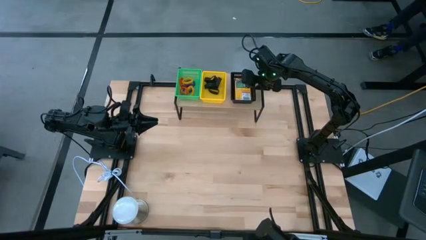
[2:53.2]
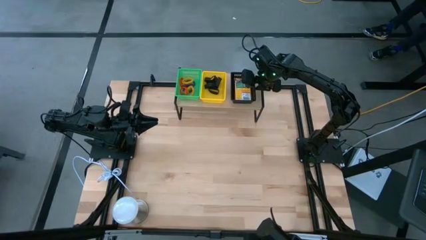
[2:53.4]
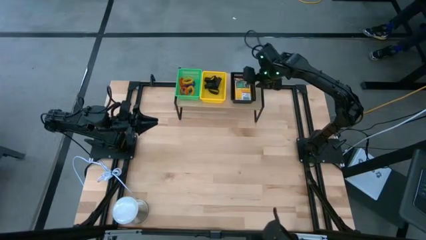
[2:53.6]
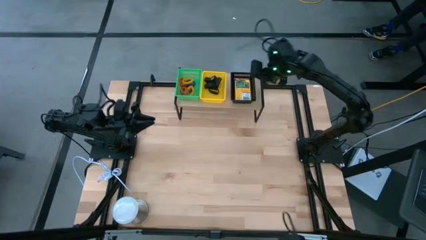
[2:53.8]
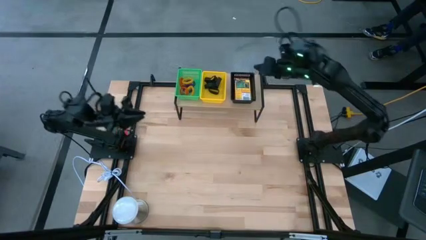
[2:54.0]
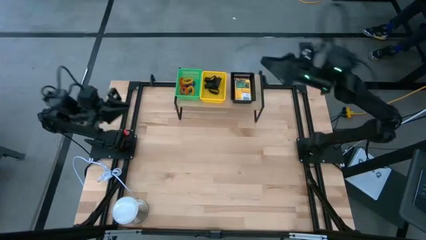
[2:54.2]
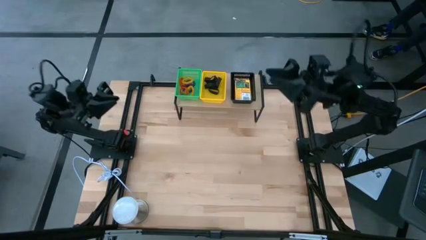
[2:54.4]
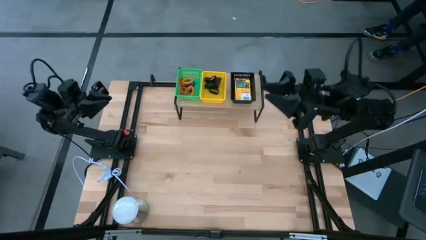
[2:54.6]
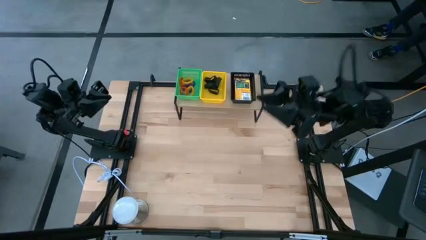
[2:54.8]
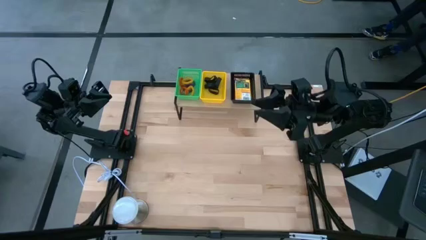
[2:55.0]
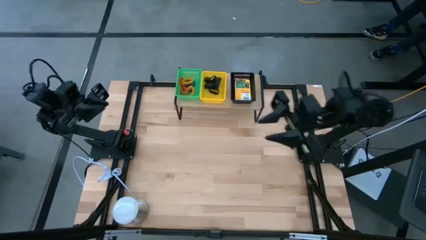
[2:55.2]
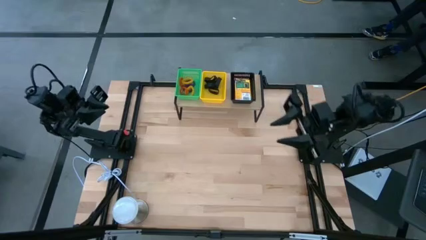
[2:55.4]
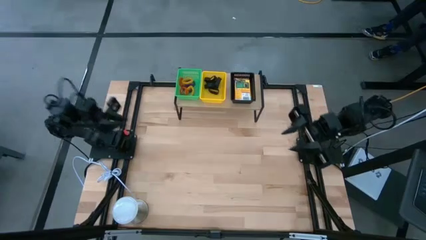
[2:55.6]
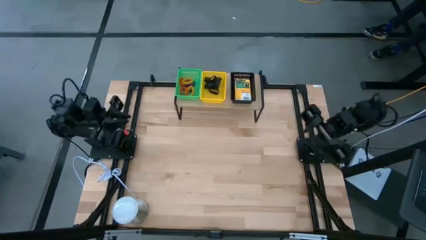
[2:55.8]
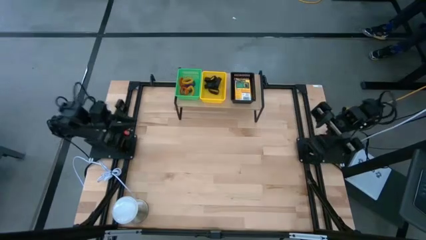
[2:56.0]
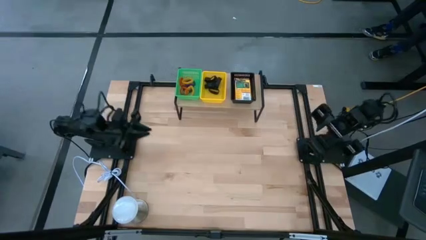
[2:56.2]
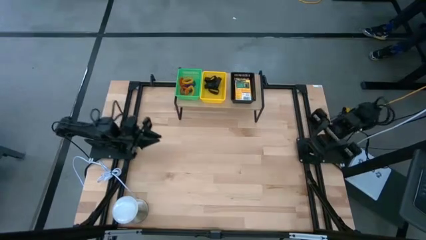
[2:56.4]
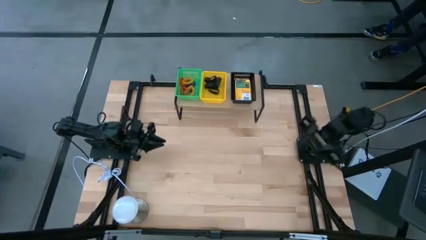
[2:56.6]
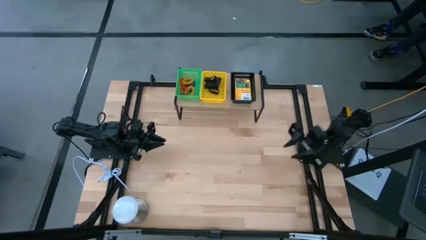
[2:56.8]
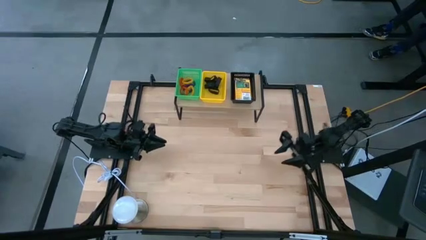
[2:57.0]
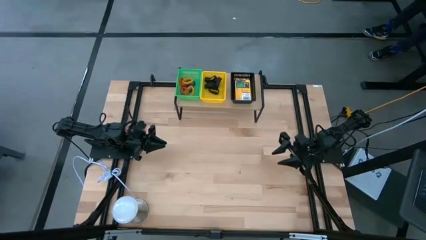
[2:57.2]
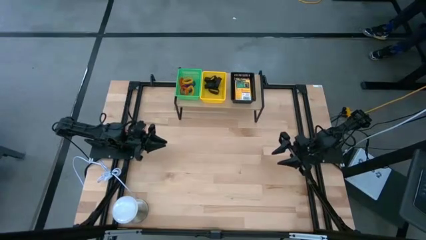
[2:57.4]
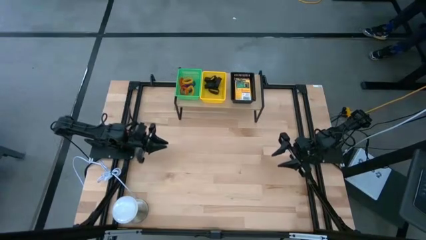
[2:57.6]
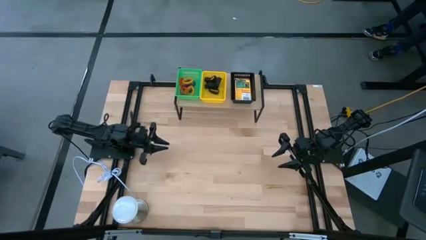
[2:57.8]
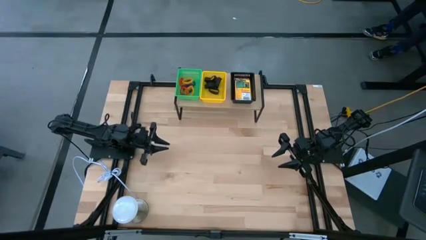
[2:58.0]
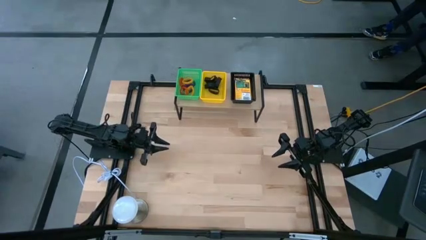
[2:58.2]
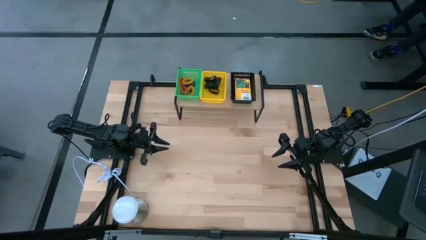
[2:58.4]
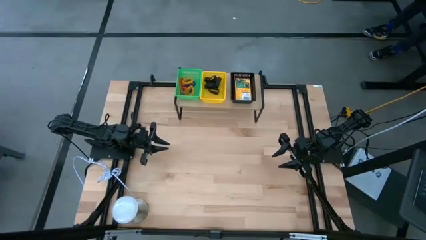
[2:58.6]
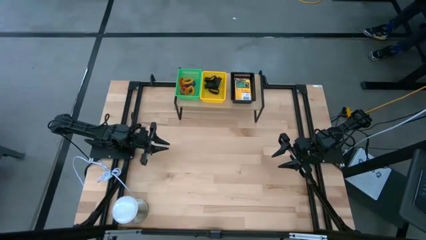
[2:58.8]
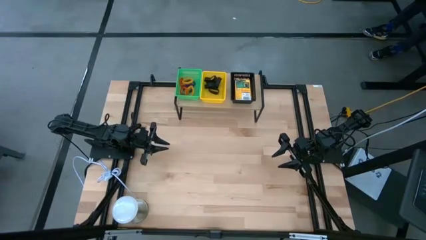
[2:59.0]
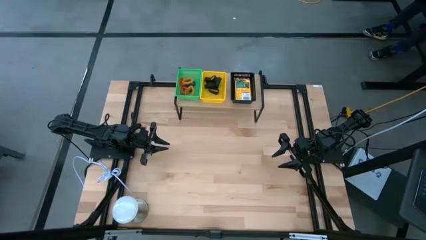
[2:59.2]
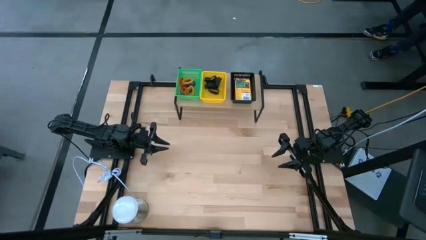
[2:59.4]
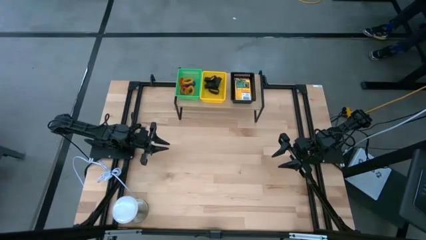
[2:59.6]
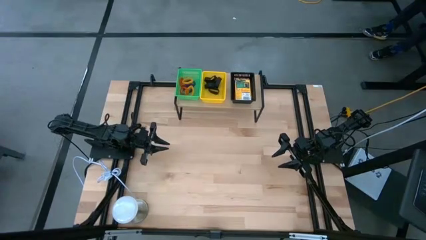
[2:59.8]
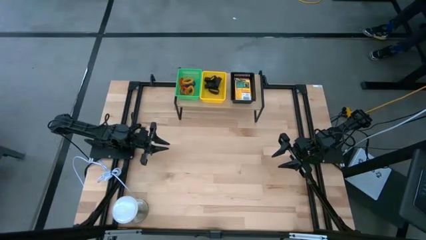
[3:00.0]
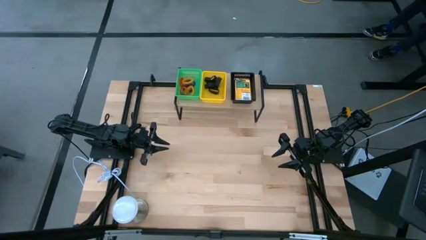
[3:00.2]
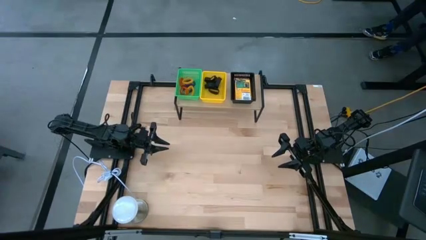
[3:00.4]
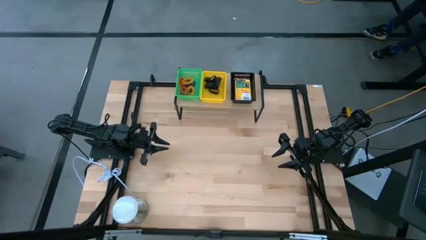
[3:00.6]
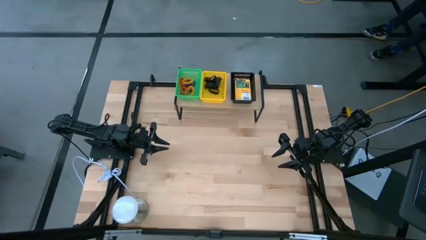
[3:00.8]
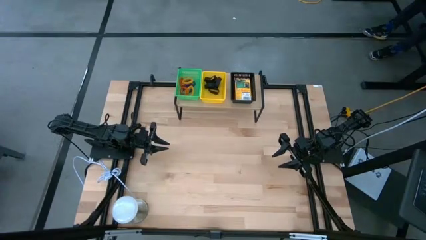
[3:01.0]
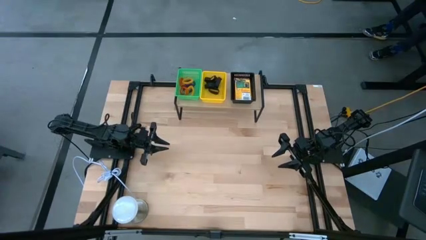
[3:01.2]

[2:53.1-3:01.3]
Task: Pick & Place Office Desk Supplies
Return to Home Position

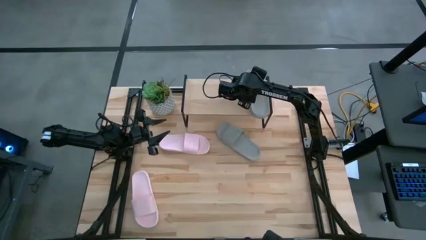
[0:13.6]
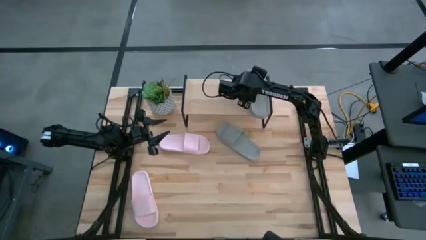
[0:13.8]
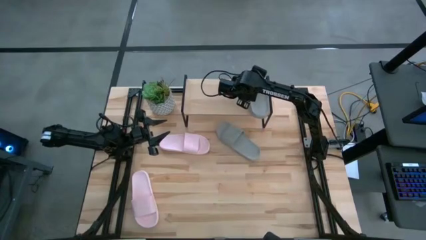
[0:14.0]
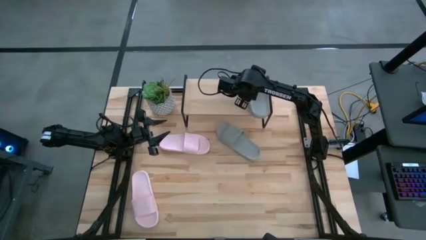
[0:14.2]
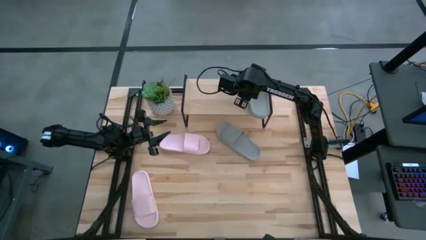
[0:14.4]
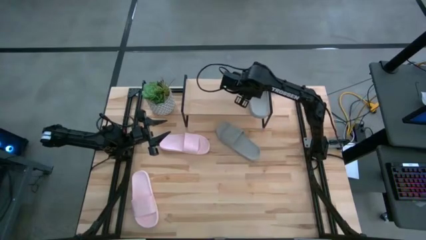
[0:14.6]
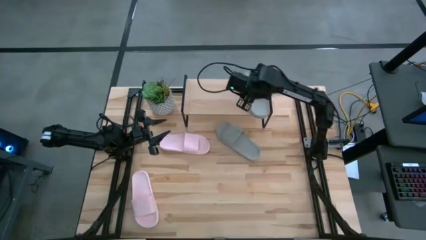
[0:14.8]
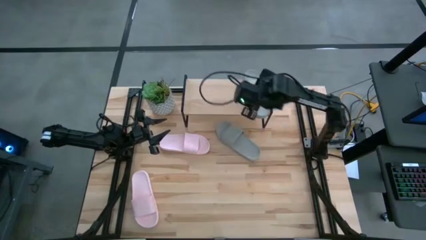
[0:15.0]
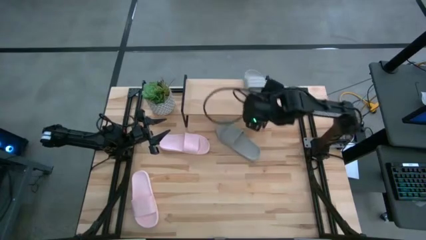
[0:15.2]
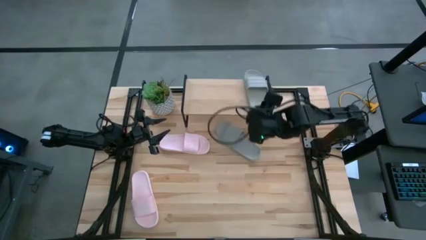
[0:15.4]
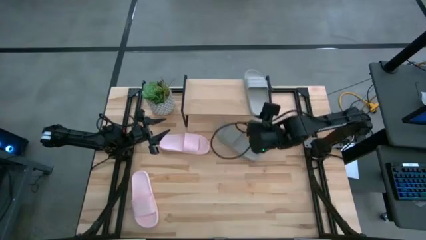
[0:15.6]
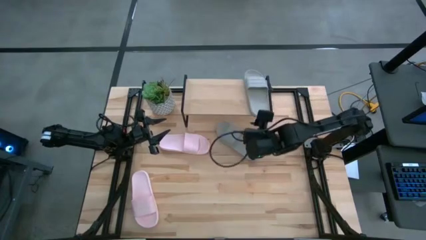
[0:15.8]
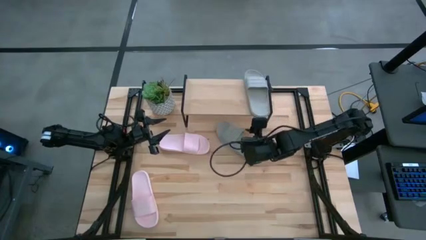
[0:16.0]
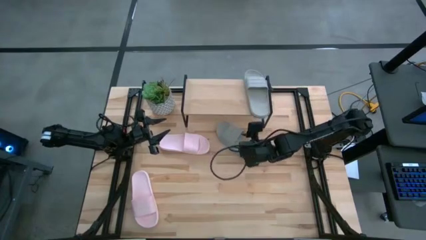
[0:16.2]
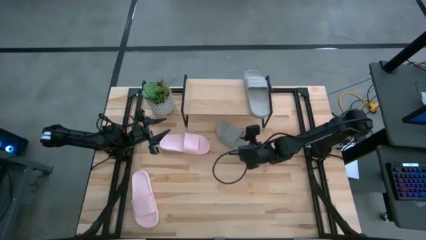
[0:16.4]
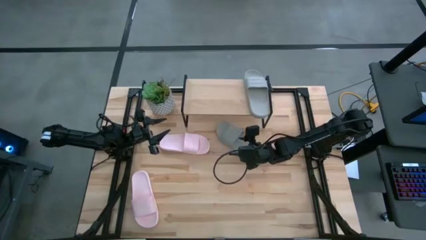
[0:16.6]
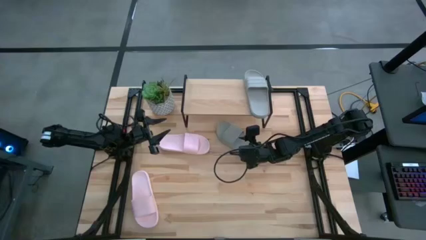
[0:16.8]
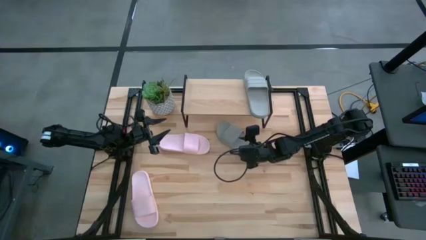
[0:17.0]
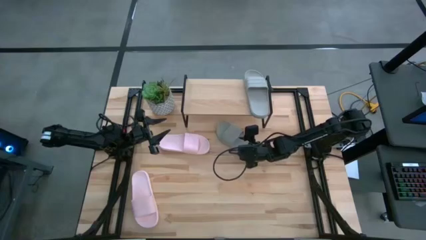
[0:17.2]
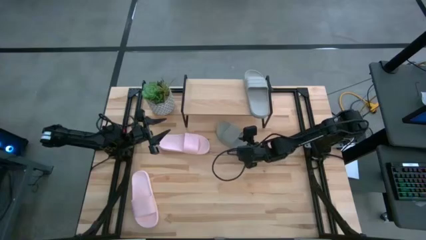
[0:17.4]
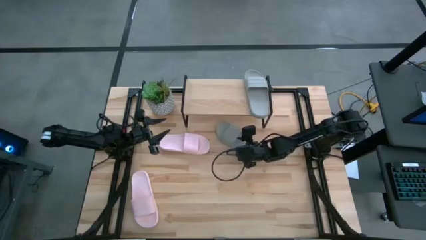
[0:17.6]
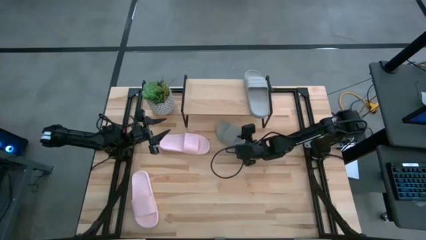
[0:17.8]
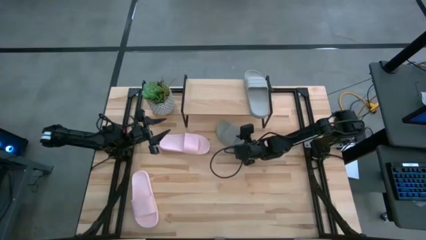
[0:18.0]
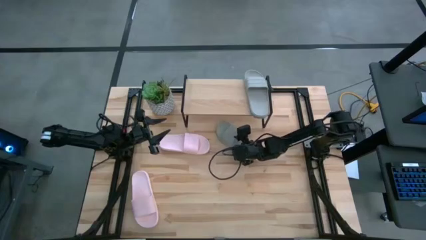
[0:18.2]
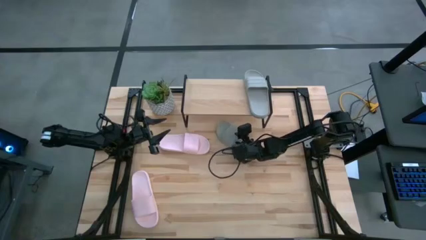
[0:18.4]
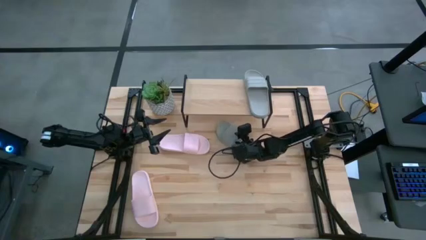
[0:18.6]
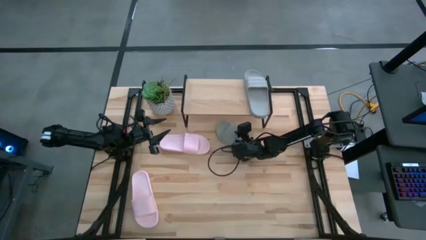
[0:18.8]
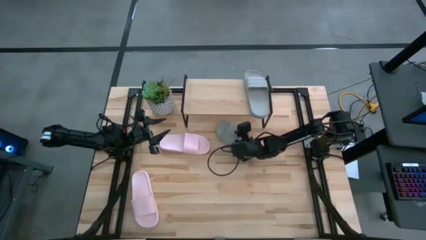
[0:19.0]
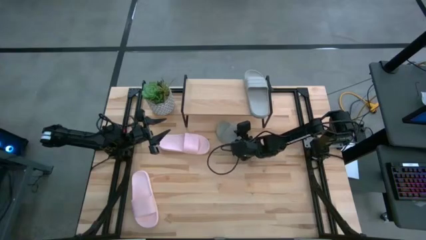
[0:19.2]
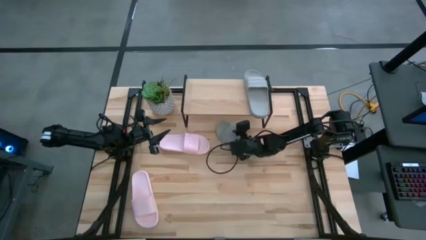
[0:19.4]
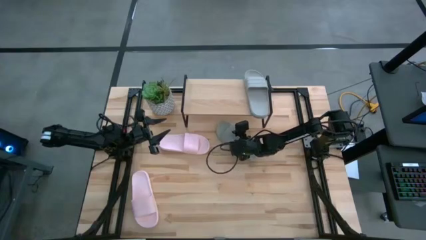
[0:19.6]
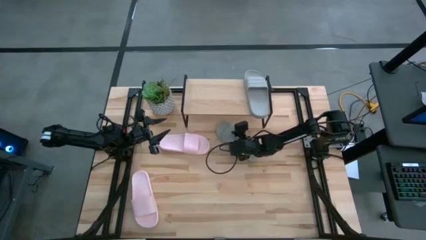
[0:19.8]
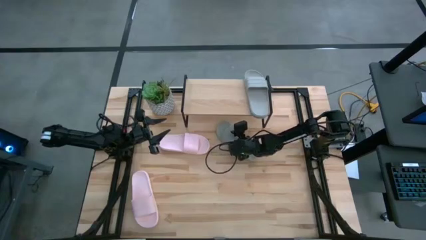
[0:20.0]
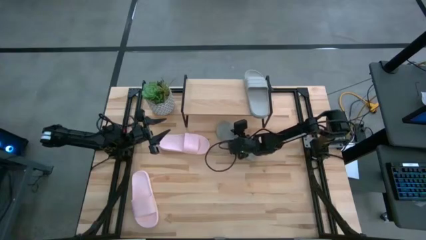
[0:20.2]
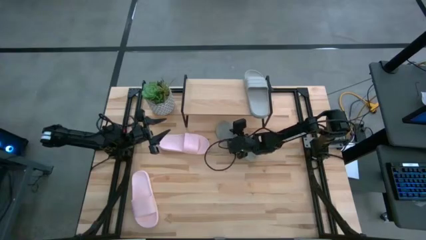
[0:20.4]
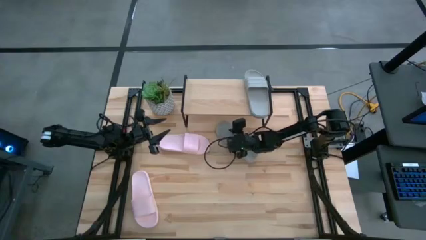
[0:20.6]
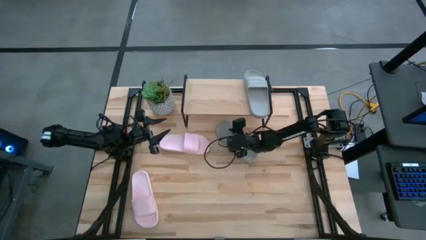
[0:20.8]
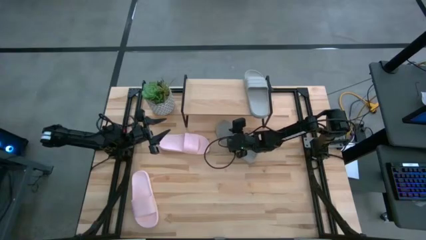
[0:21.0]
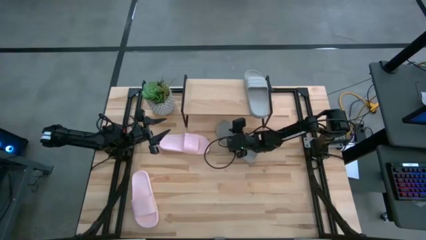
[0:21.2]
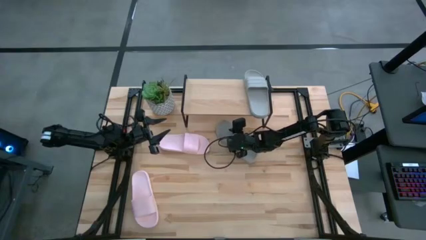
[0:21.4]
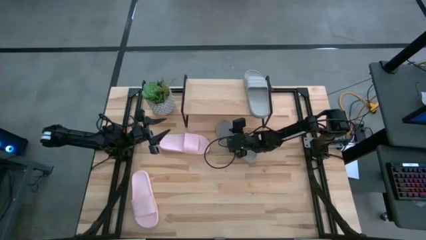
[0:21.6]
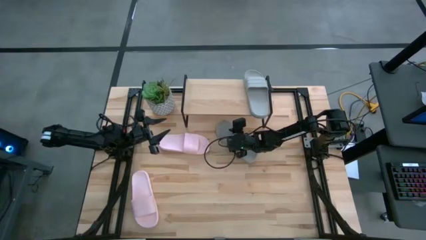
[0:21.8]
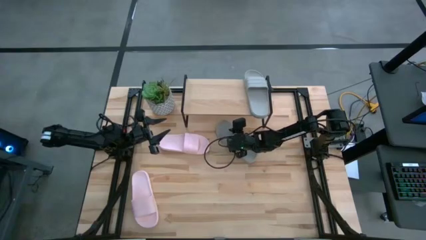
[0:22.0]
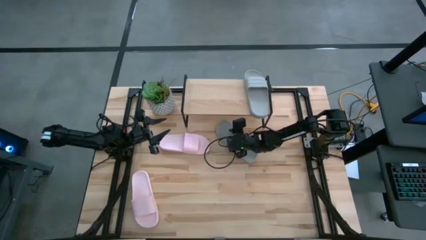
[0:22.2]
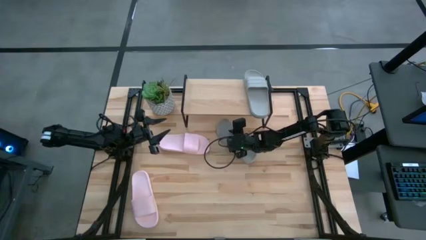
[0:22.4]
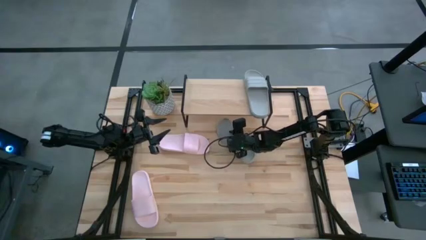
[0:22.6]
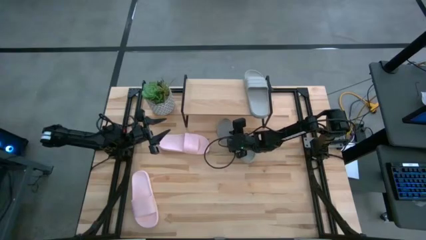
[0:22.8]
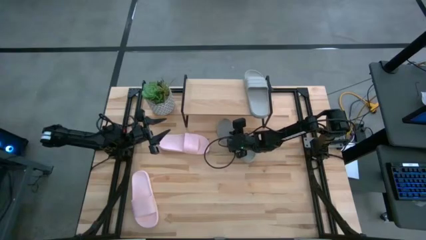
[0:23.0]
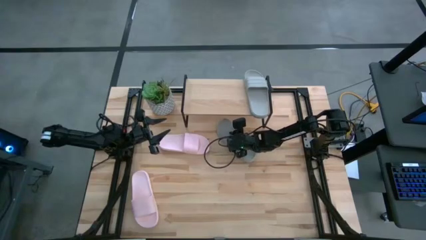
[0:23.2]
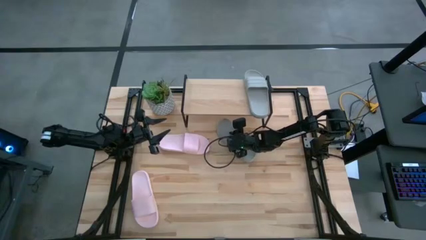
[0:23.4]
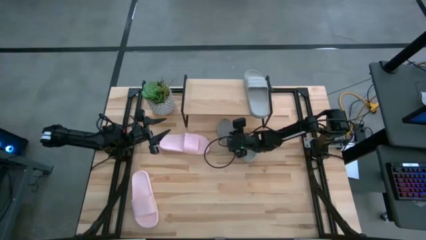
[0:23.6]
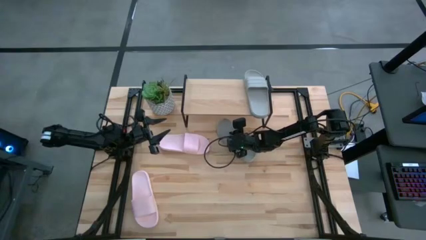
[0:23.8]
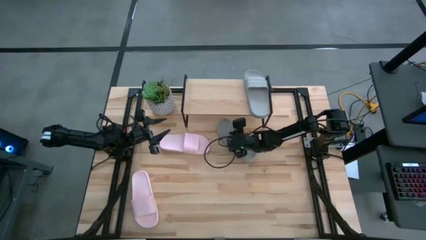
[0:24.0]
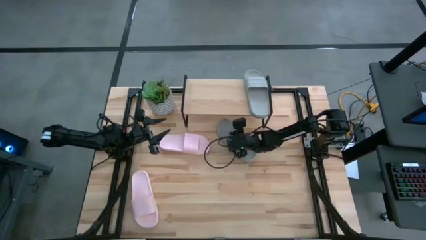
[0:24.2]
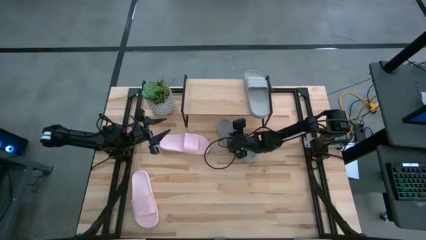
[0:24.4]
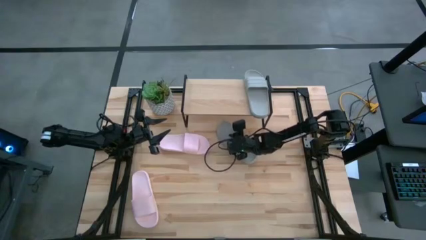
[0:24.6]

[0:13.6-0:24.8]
Task: Pick and place slides into the shelf
Put the gray slide on the shelf
